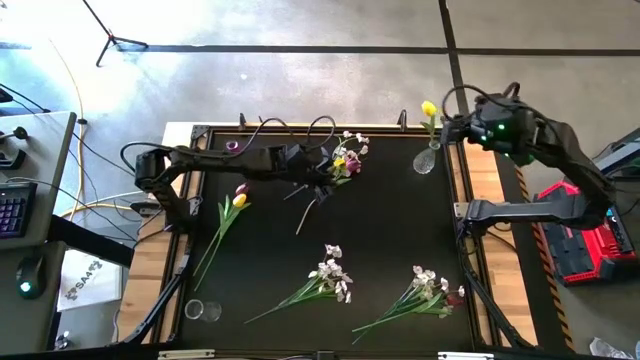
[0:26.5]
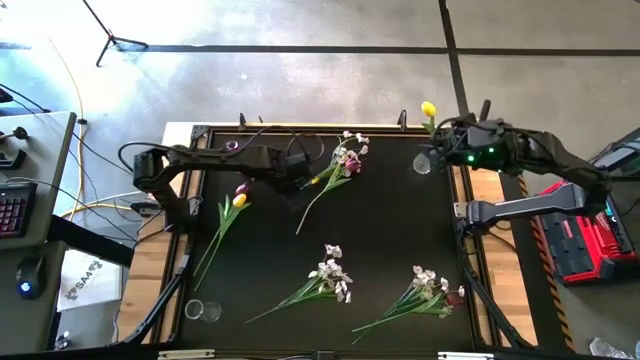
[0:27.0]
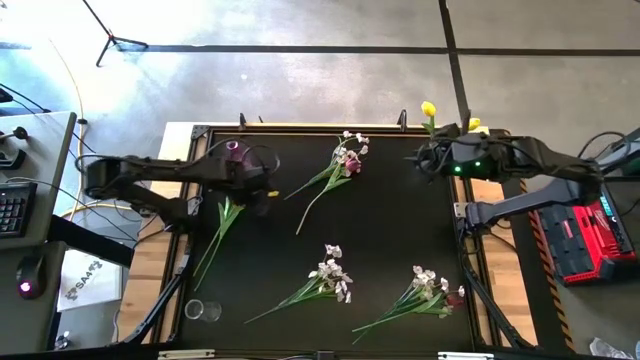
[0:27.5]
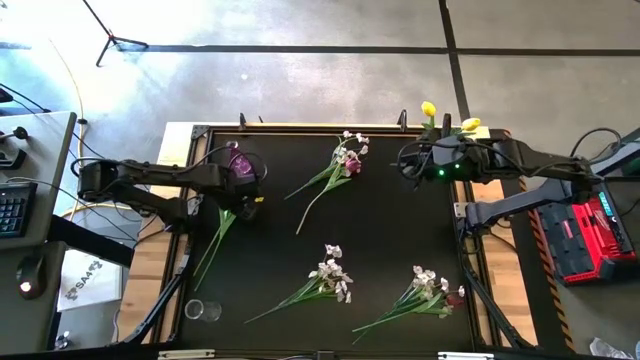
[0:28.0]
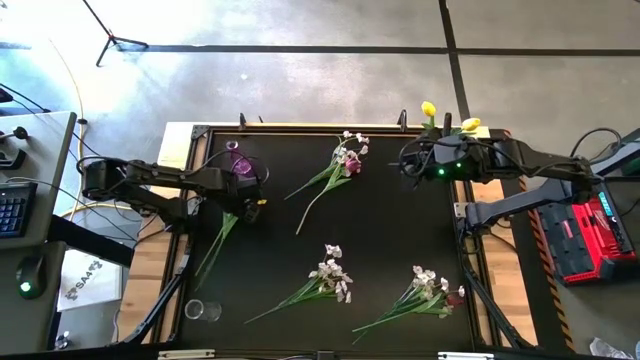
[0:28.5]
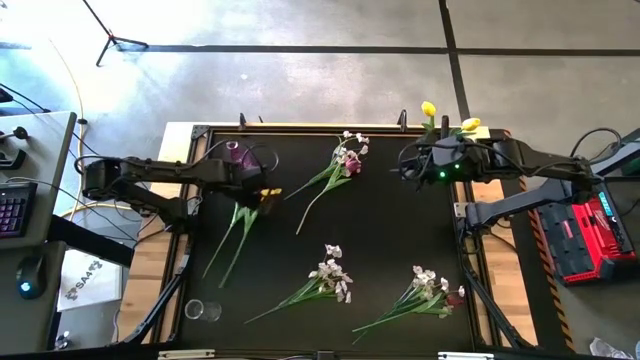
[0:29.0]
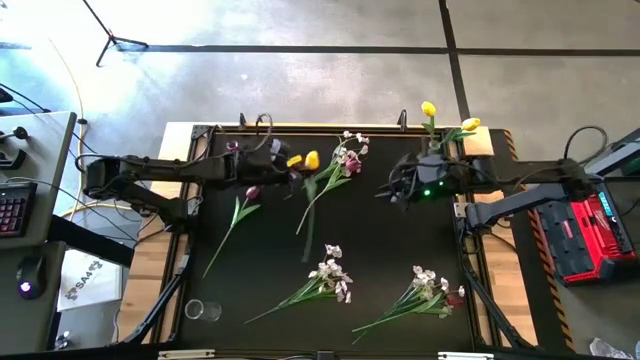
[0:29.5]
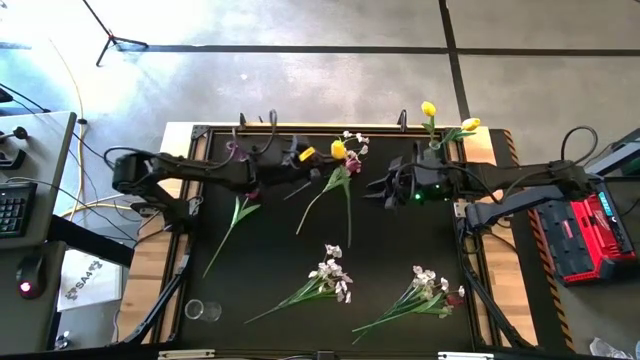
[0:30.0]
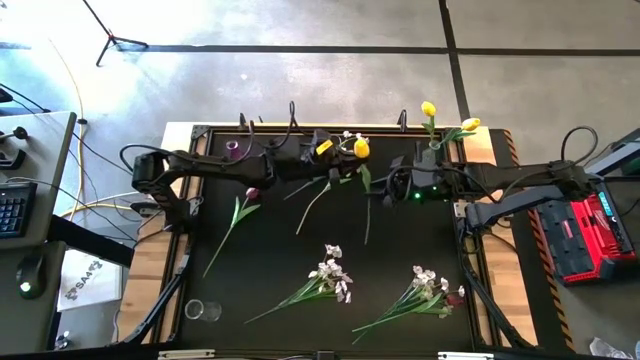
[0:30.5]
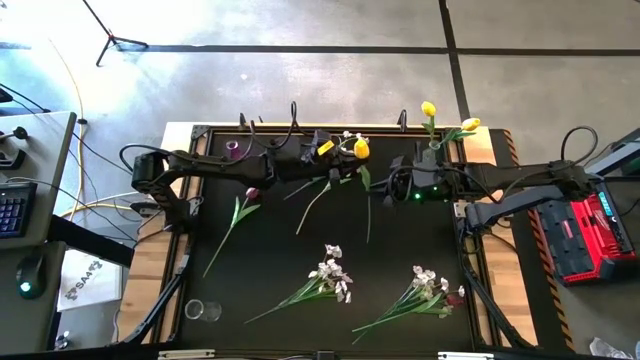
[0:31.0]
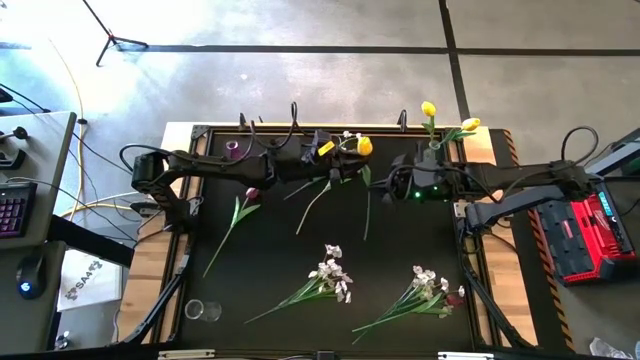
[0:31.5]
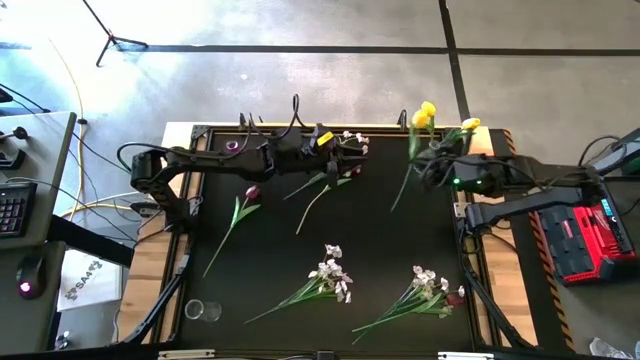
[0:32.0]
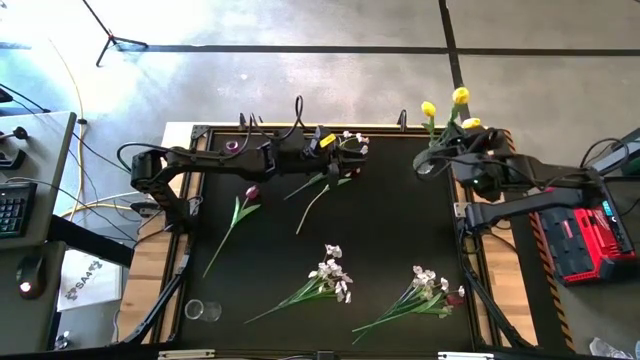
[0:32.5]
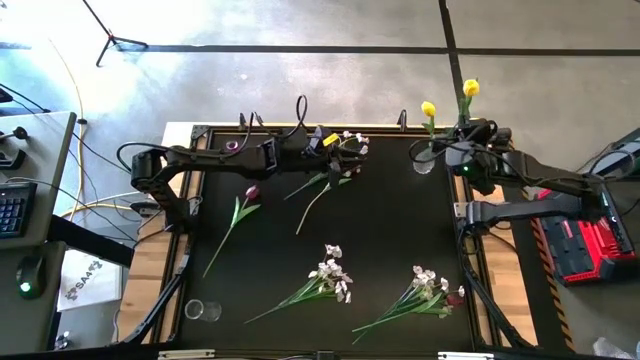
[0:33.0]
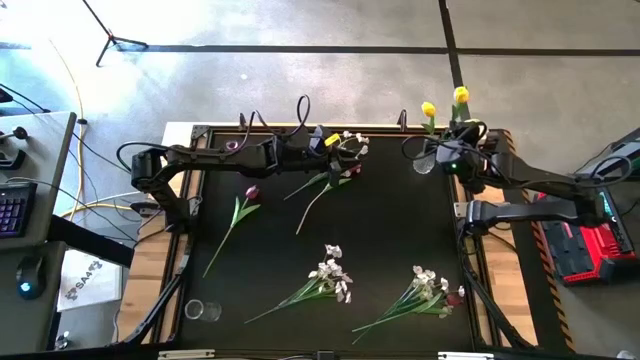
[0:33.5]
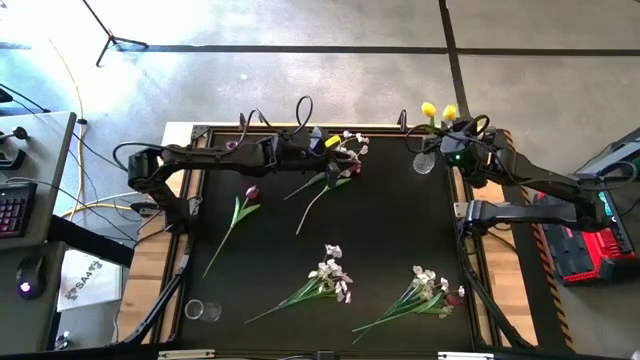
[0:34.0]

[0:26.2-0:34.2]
Task: Sort flowers into vase by color
Put the yellow tulip into the top transparent flower vase

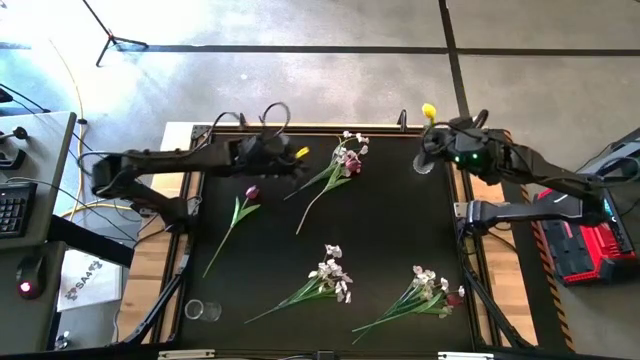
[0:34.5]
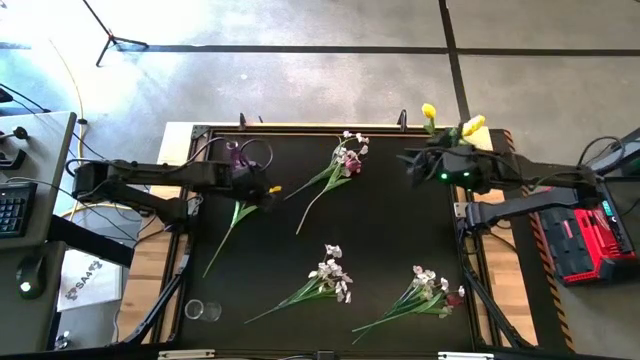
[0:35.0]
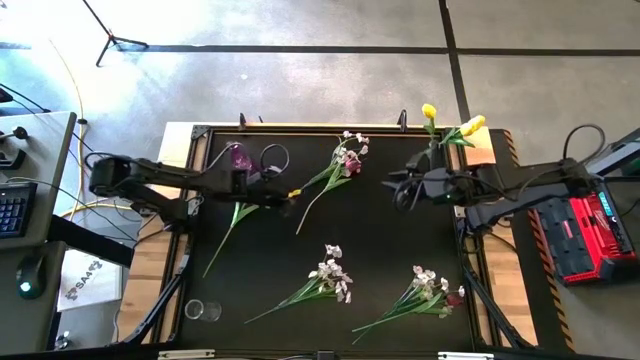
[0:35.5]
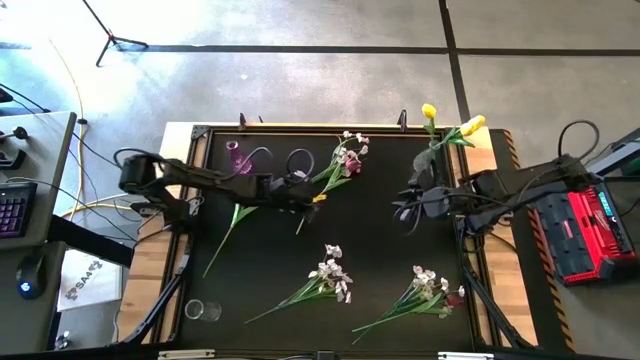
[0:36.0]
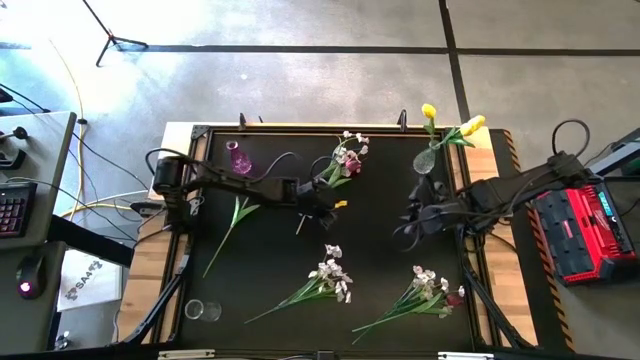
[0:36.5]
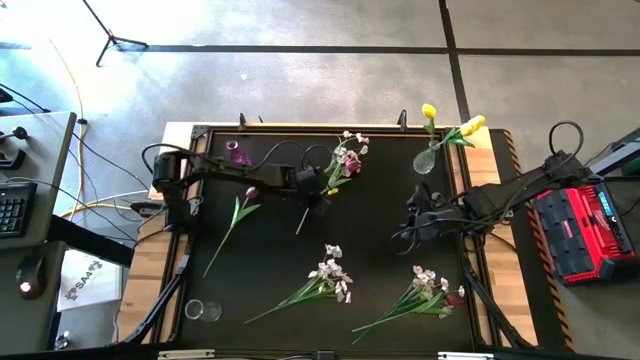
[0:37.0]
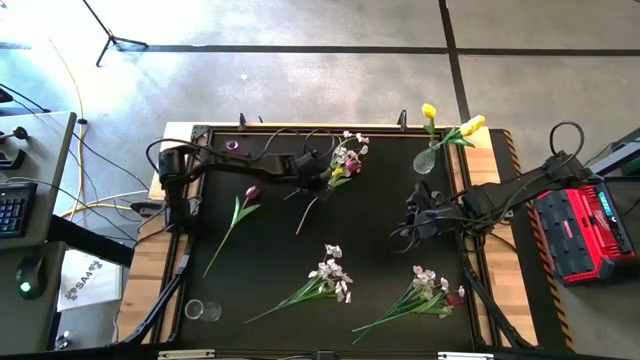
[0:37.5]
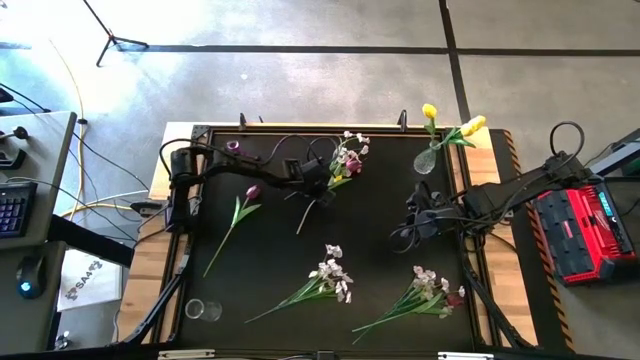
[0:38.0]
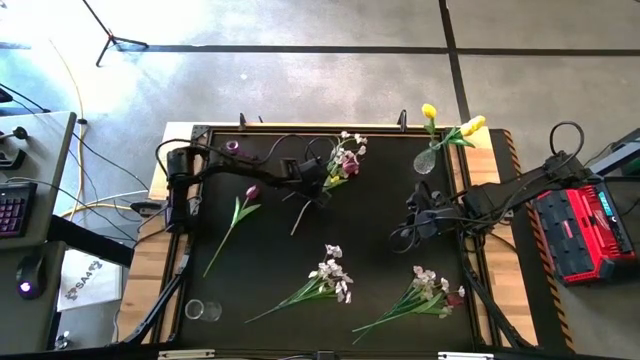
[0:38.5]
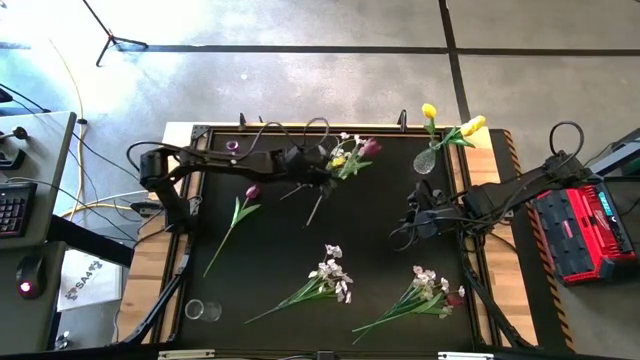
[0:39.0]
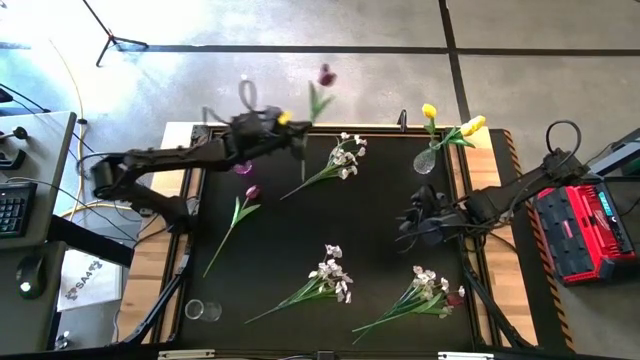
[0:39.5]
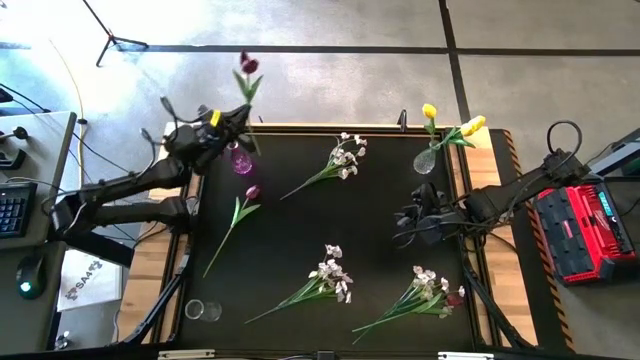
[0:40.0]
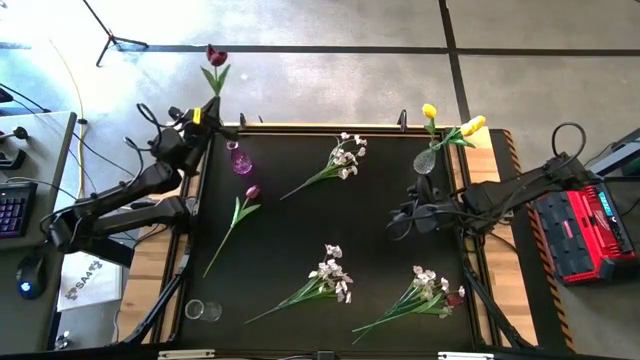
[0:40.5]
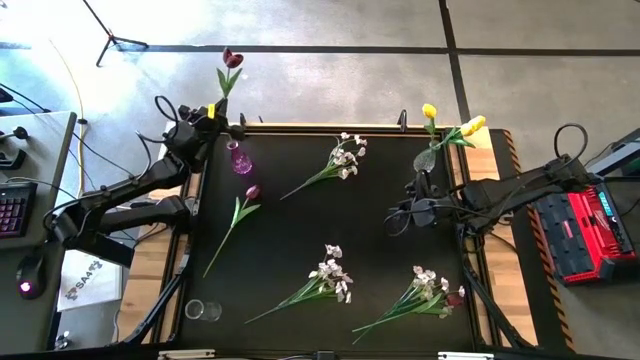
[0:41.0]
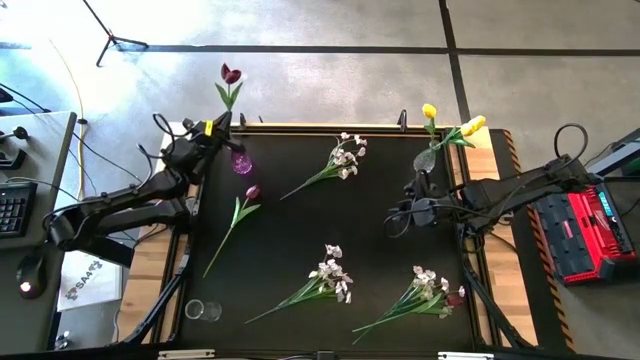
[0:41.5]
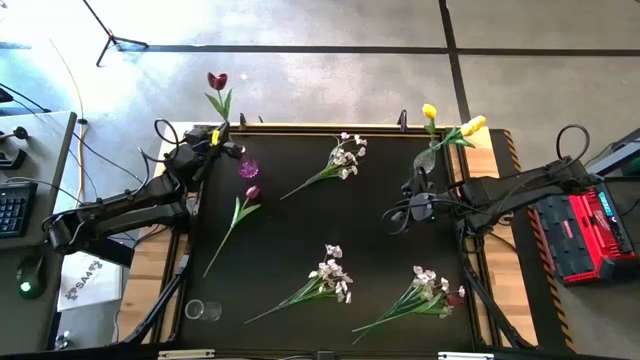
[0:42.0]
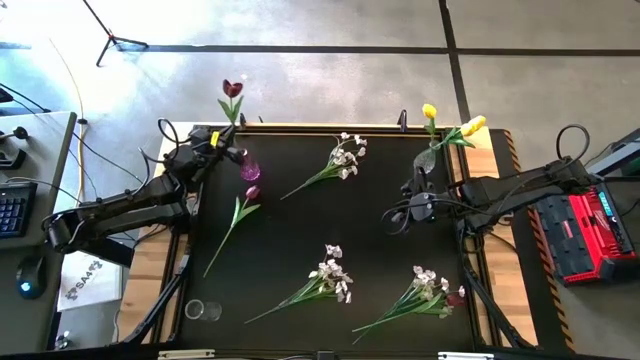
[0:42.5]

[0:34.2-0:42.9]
Put the top red tulip into the purple flower vase

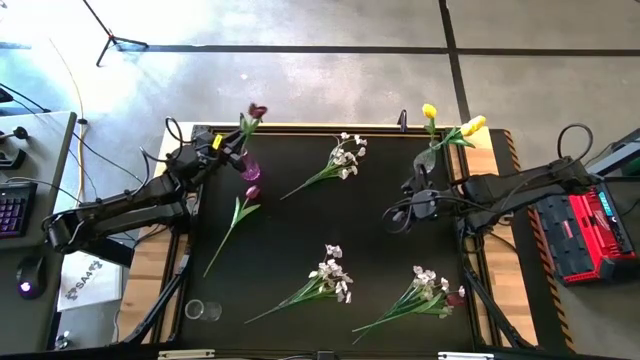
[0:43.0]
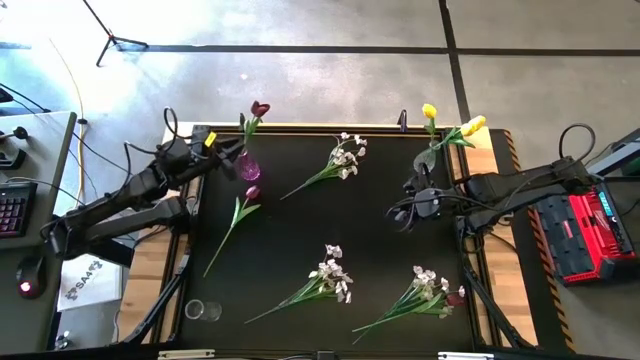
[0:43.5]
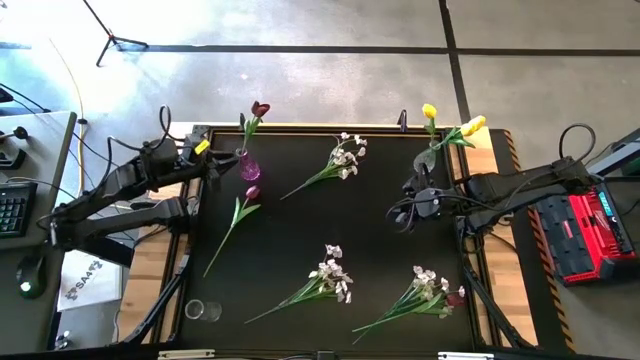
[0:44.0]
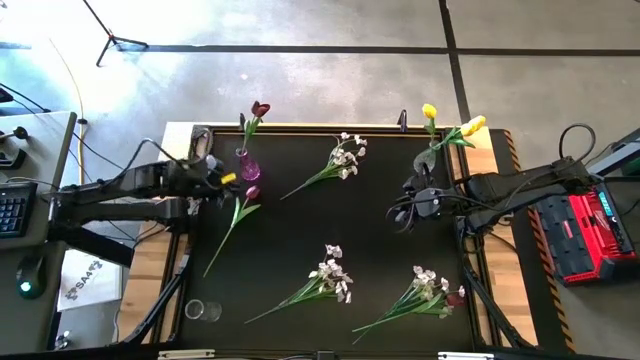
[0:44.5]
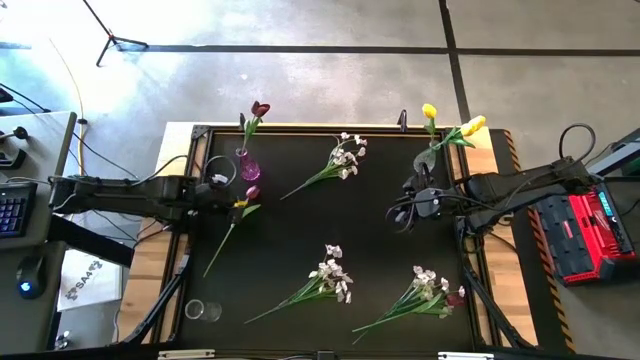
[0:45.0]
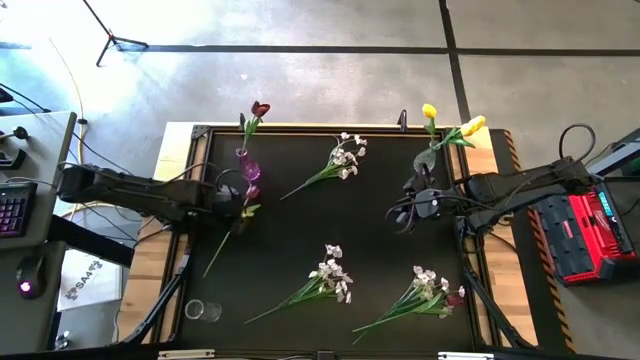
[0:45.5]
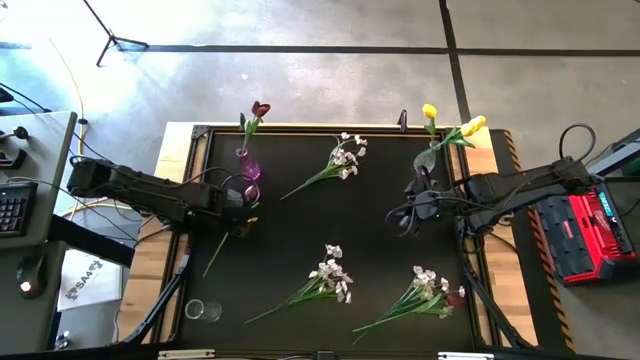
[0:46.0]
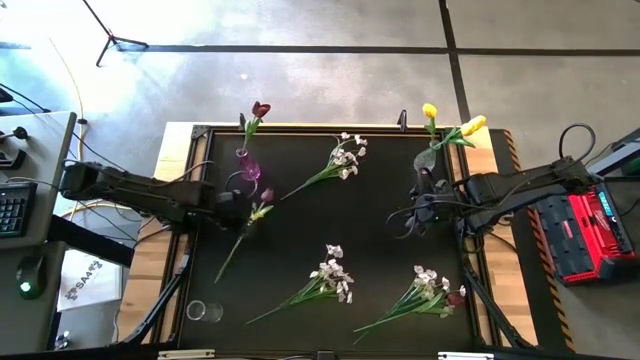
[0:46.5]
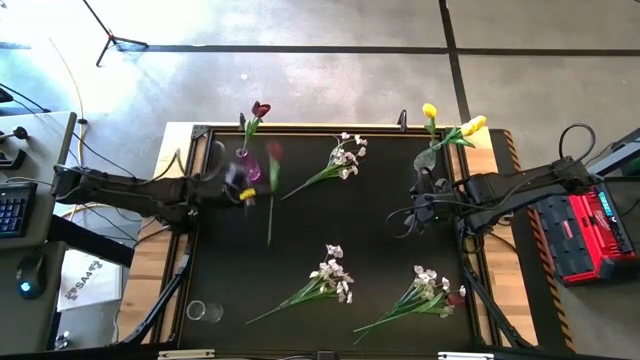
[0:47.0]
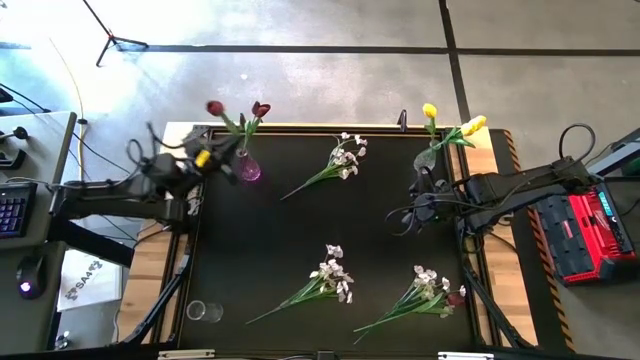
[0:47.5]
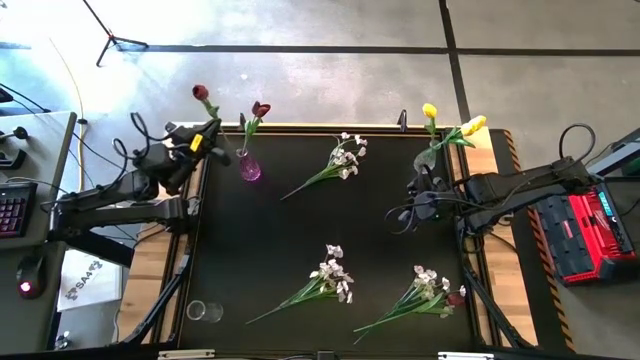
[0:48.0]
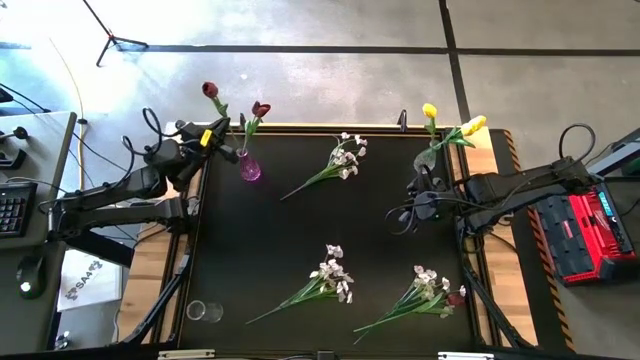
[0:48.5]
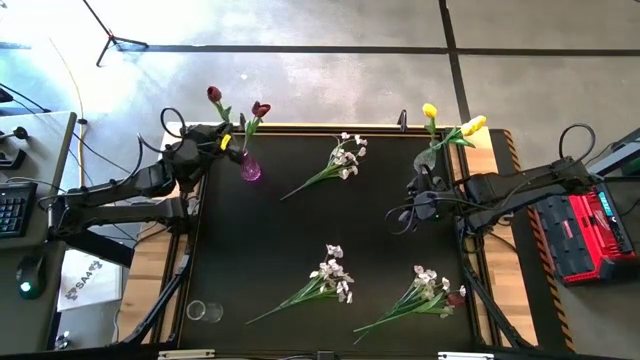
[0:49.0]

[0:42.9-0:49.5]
Put the top red tulip into the purple flower vase
